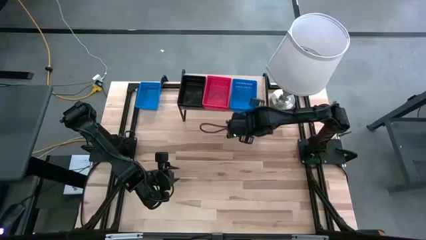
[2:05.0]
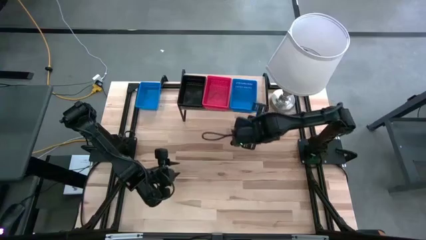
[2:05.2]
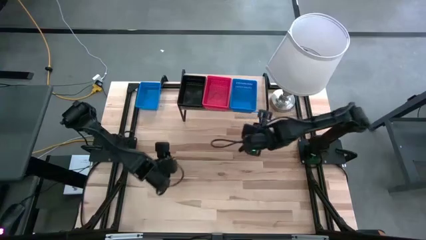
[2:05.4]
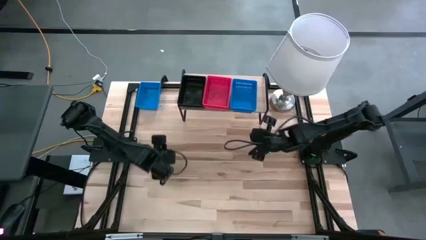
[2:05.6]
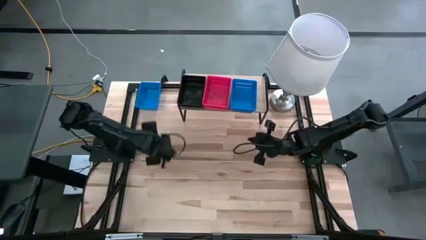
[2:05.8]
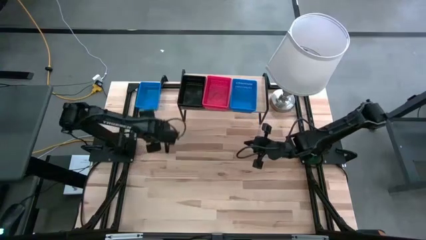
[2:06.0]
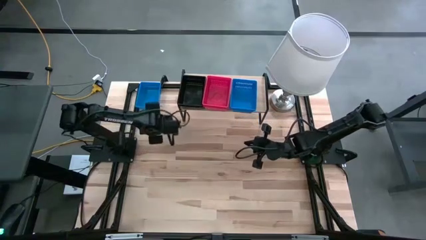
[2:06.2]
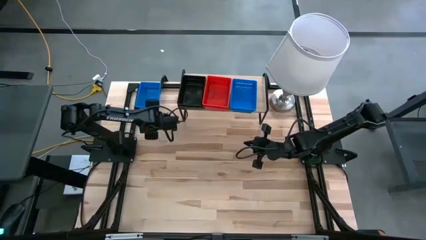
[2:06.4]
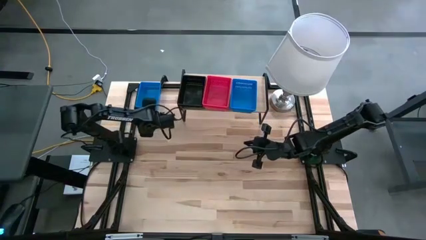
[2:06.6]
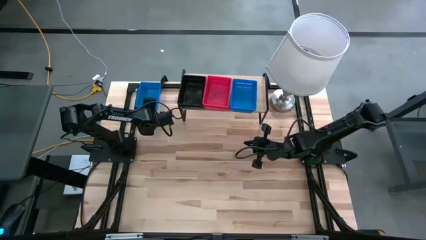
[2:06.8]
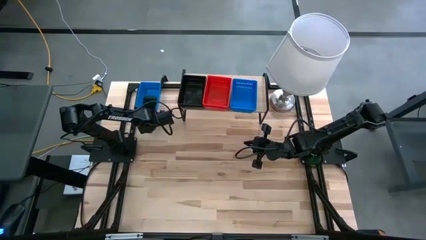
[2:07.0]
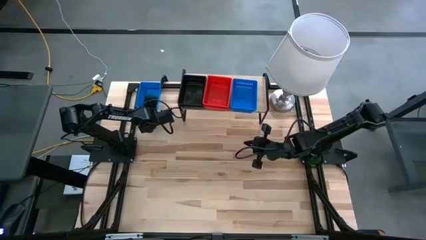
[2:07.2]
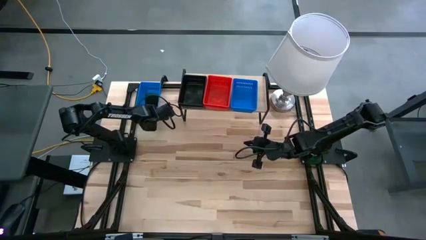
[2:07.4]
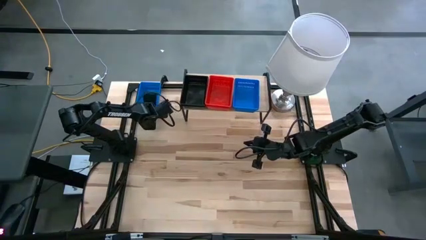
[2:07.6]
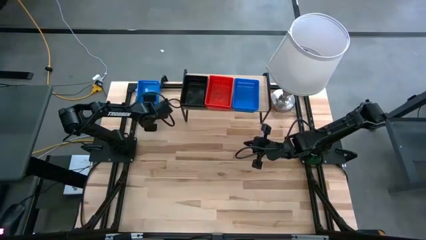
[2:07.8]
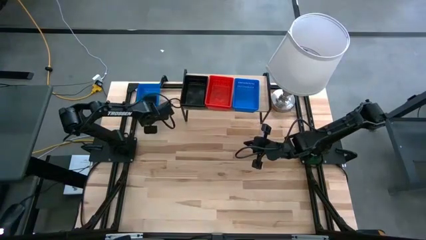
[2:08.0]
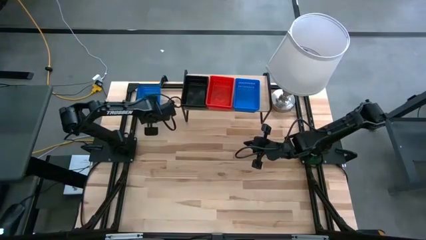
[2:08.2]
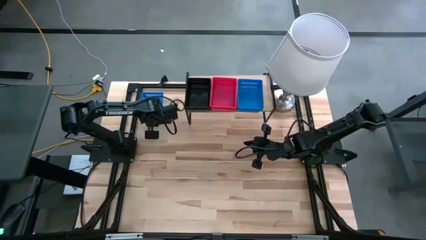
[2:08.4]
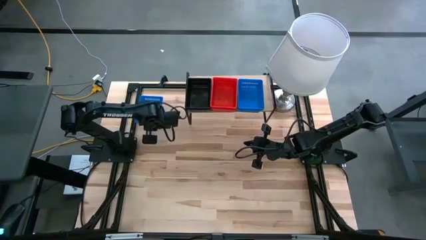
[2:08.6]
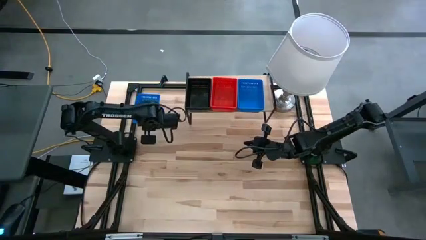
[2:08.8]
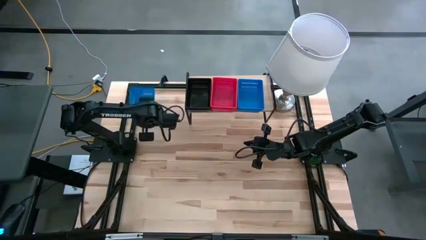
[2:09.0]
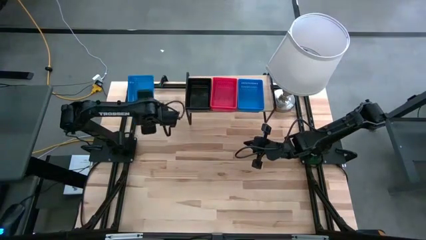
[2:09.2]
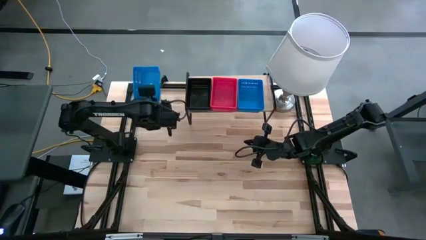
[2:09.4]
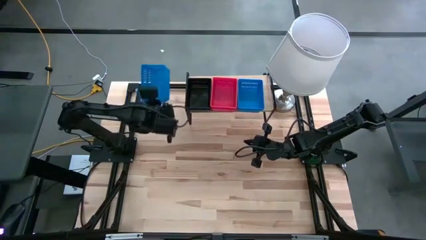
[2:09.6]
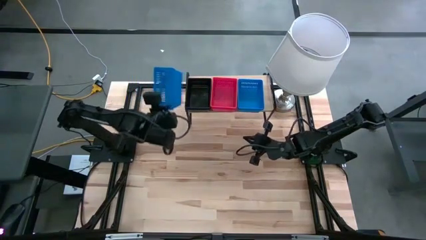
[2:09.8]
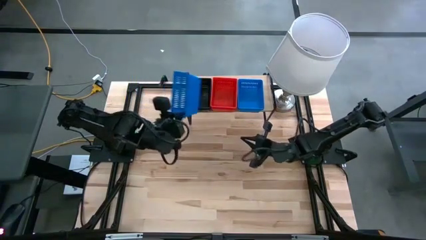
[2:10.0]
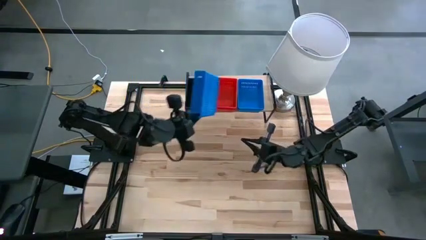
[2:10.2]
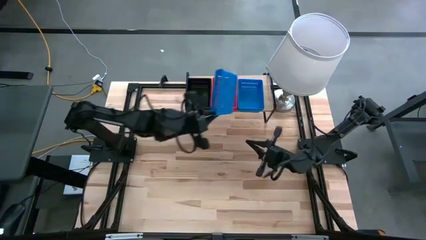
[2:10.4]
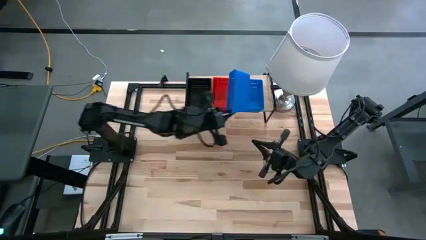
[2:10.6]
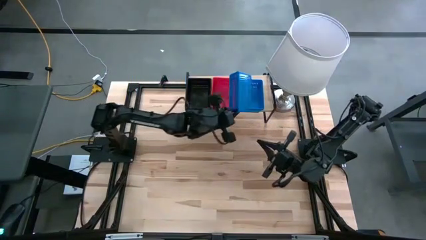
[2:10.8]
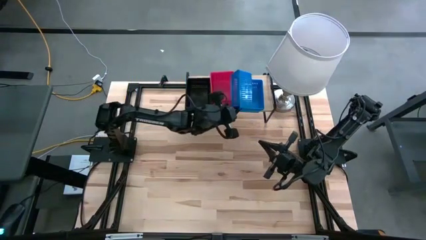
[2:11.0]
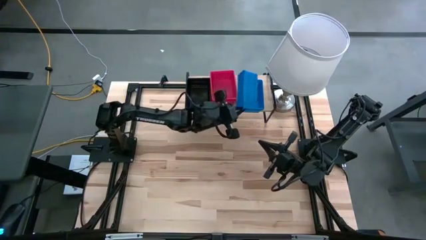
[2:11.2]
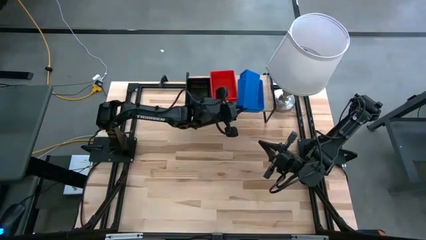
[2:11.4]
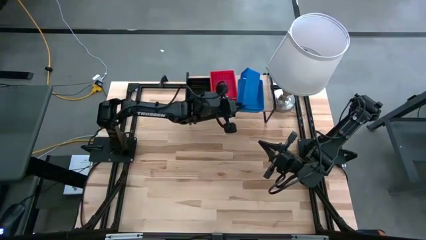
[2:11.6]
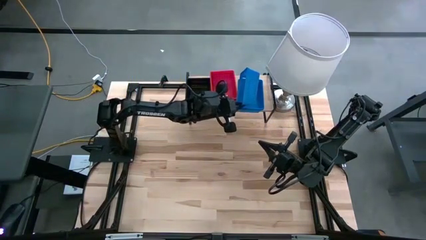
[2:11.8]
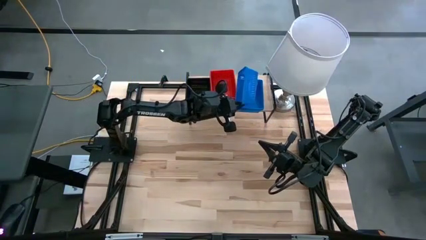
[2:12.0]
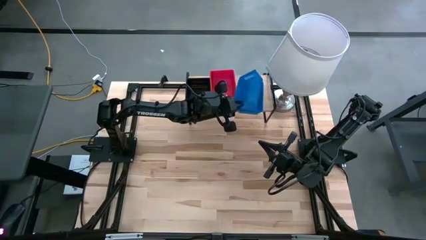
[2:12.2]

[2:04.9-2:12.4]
Task: Stack baskets on shelf by color
Stack the blue bin on top of the blue bins on the shelf

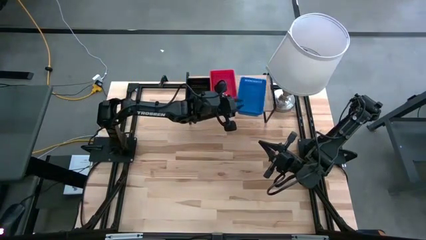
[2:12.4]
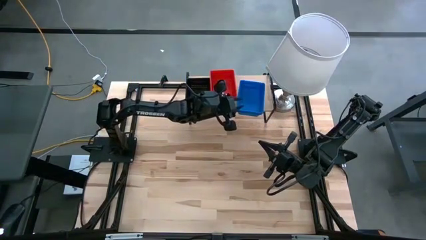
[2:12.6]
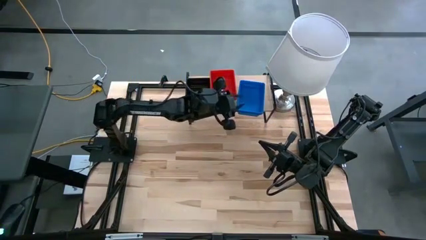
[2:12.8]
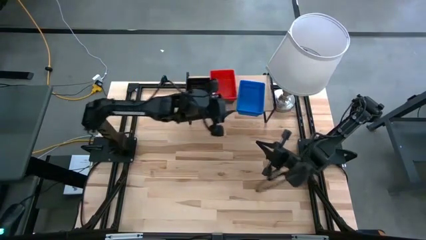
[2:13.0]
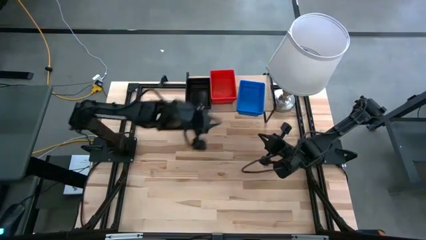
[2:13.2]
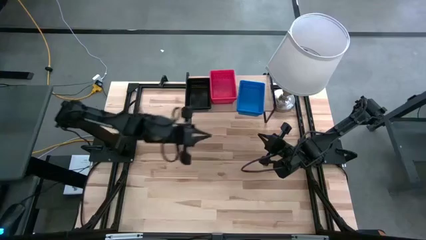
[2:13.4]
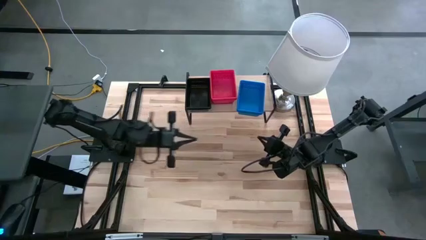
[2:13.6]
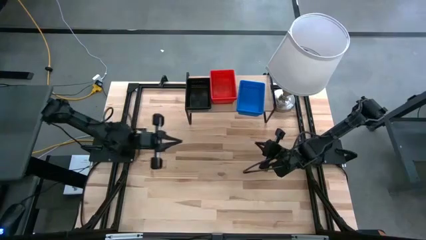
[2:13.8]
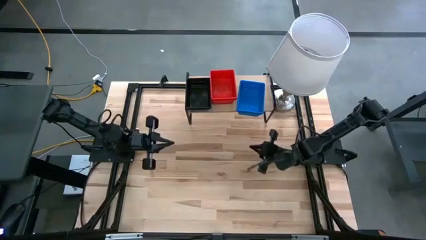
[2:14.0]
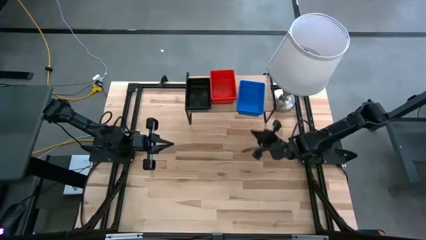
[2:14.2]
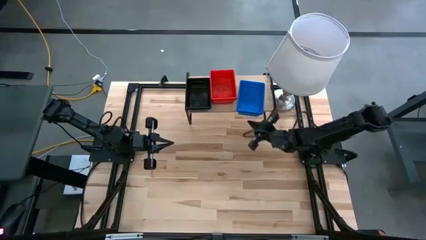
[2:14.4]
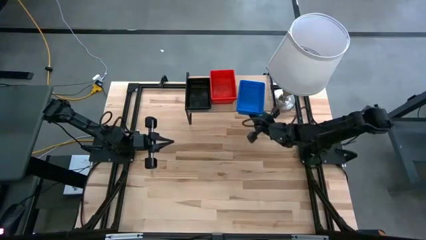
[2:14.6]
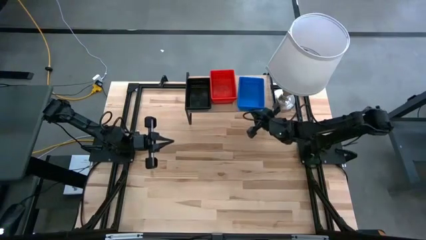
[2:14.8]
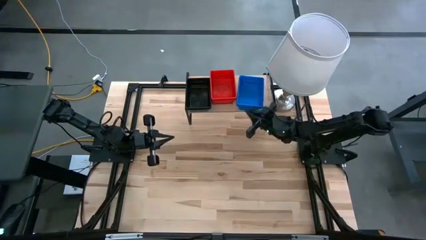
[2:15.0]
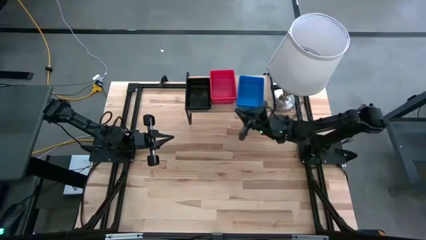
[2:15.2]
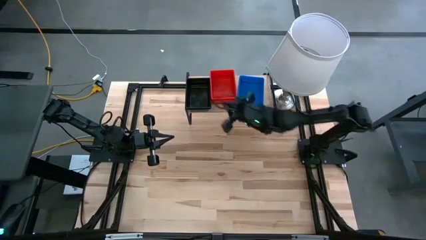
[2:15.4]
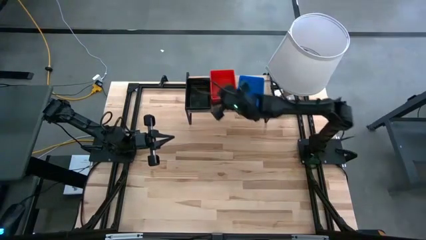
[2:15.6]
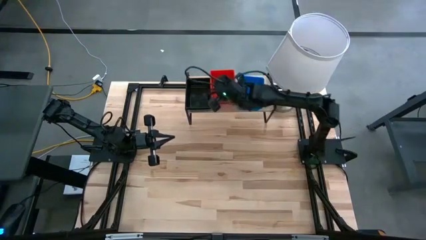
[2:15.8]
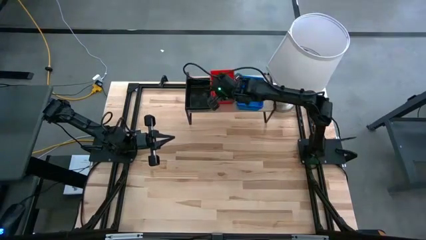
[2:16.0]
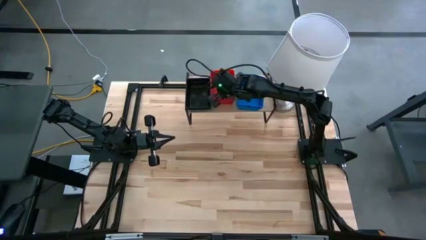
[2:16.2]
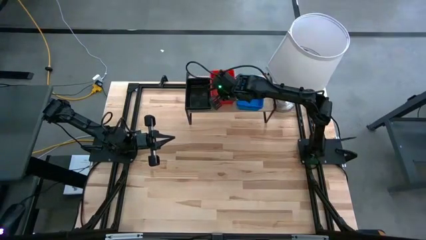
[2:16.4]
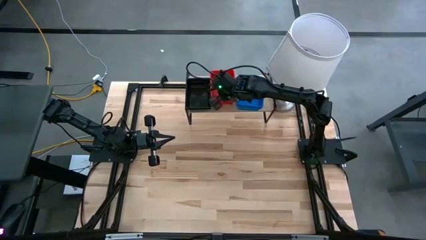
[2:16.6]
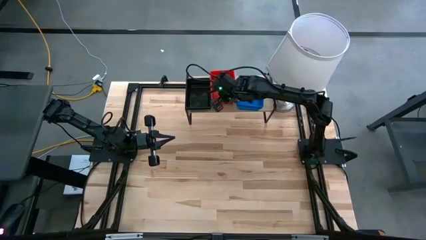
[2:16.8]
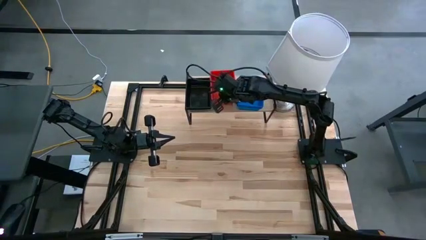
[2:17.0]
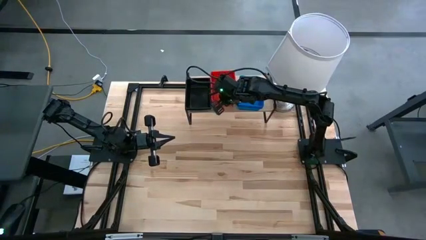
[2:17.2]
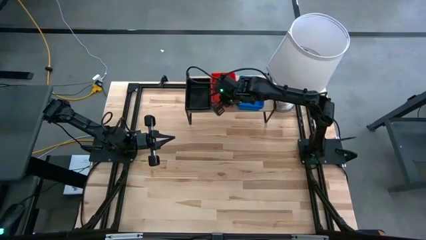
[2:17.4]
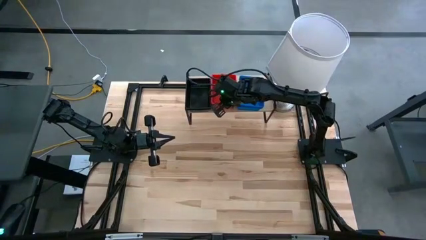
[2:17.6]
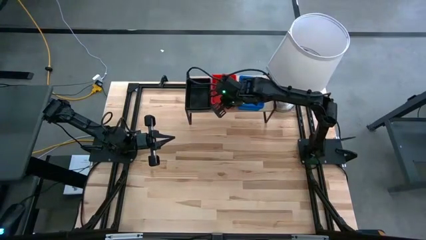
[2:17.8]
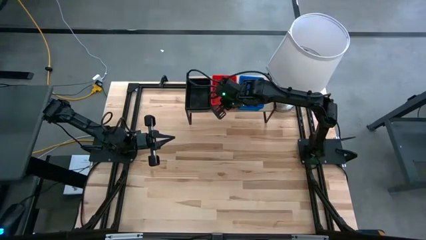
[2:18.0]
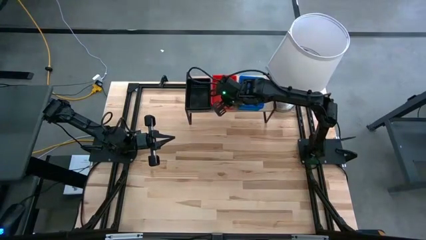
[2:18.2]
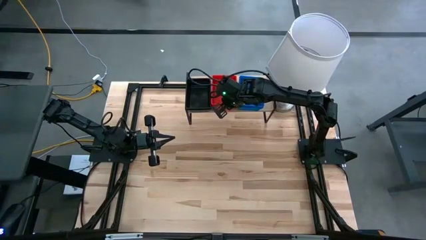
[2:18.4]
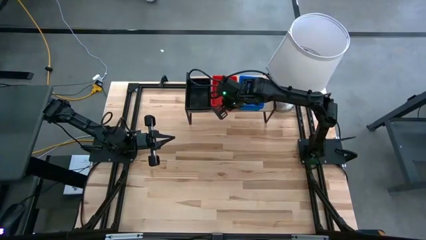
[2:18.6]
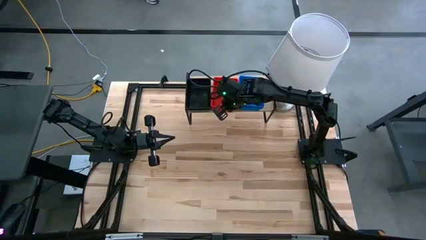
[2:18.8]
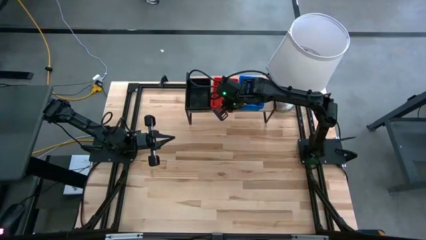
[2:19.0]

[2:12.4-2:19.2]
Adjust the bins on the shelf
